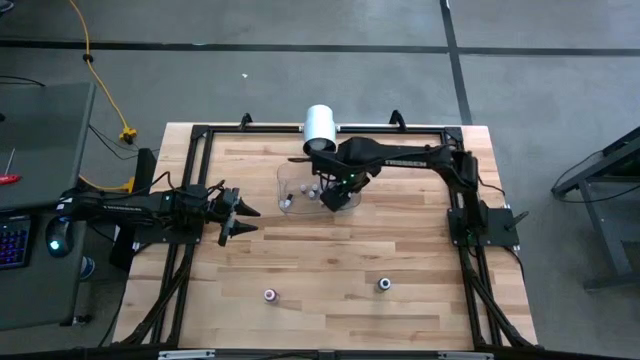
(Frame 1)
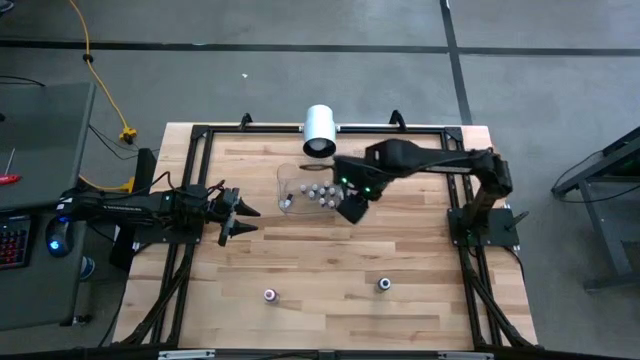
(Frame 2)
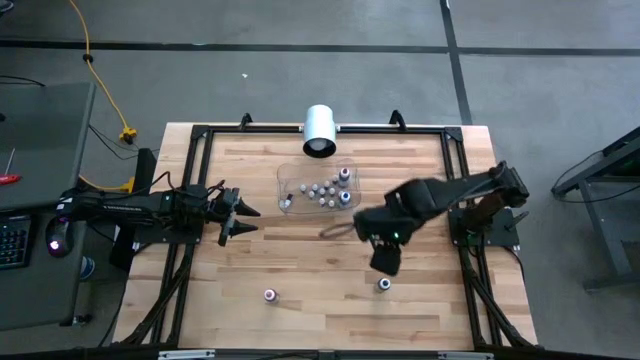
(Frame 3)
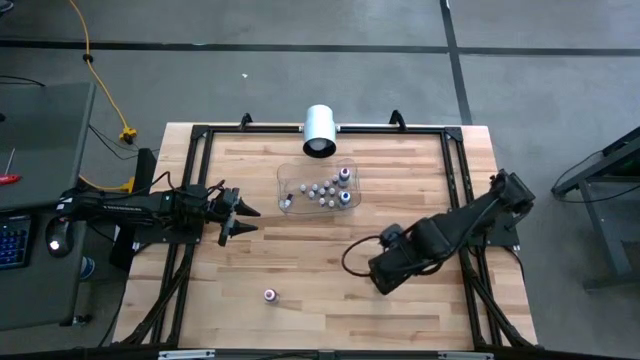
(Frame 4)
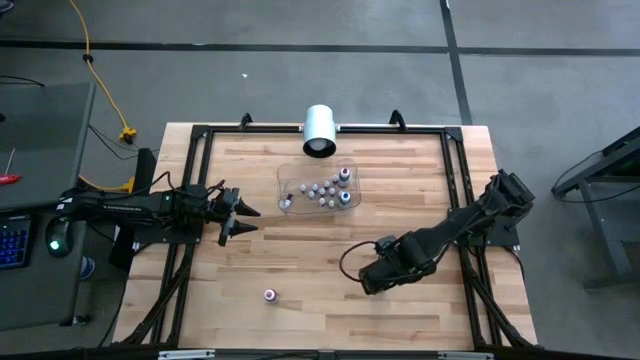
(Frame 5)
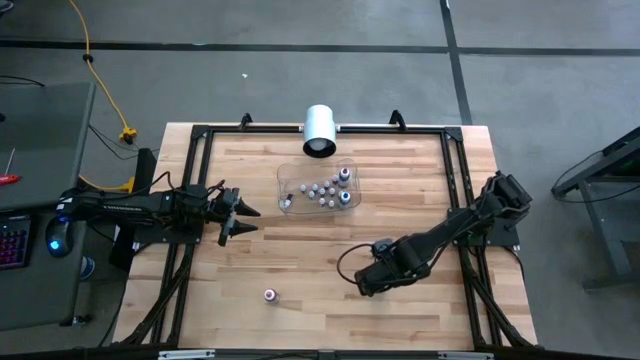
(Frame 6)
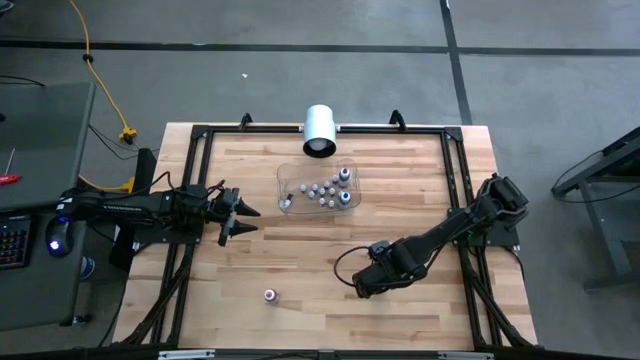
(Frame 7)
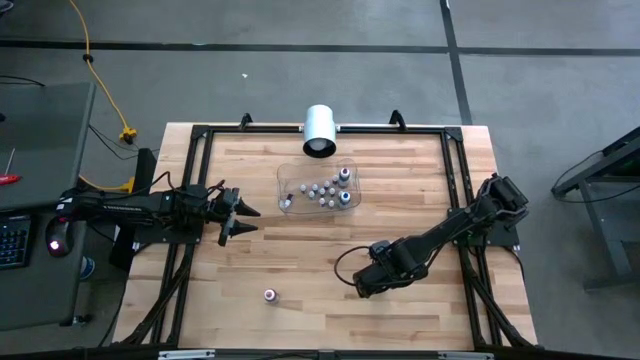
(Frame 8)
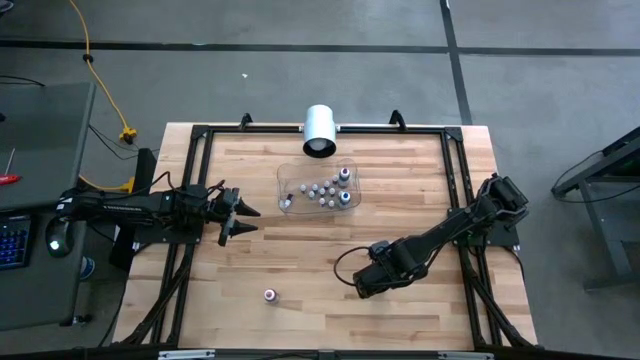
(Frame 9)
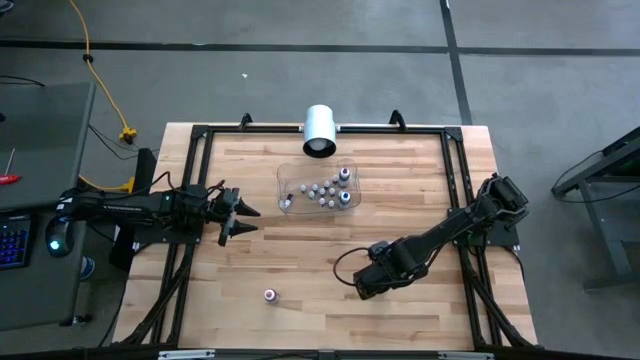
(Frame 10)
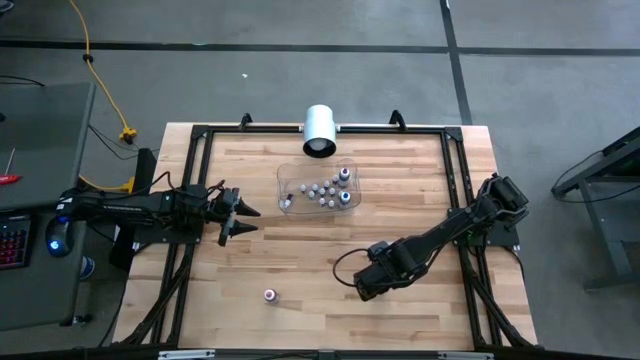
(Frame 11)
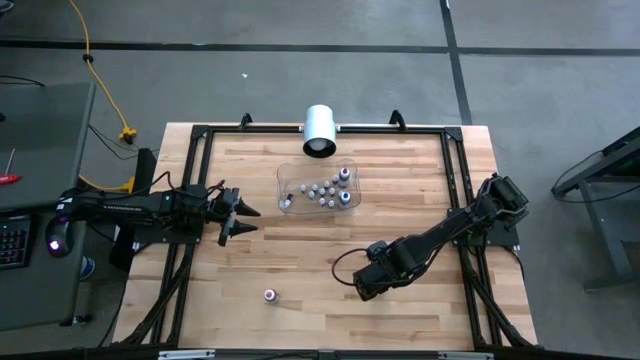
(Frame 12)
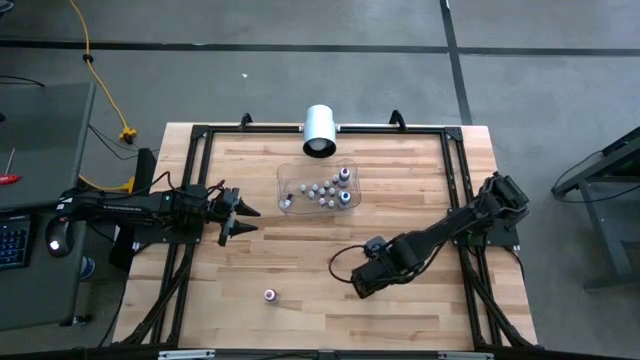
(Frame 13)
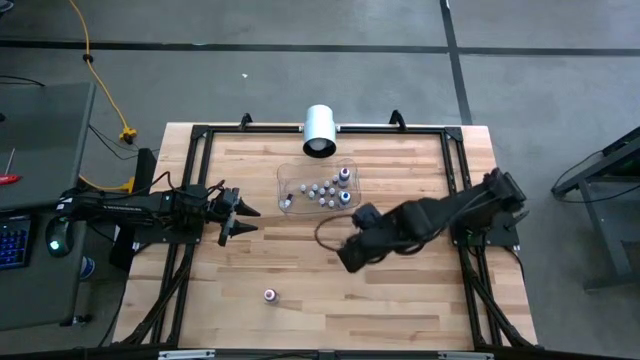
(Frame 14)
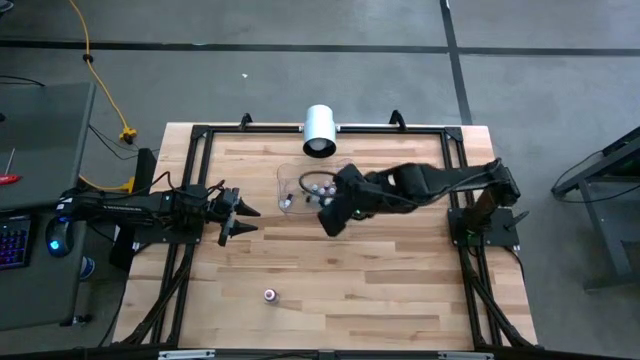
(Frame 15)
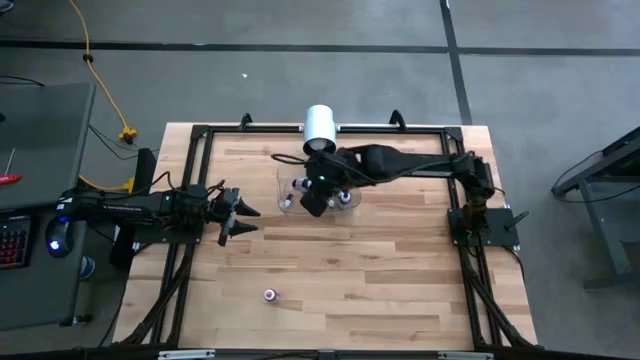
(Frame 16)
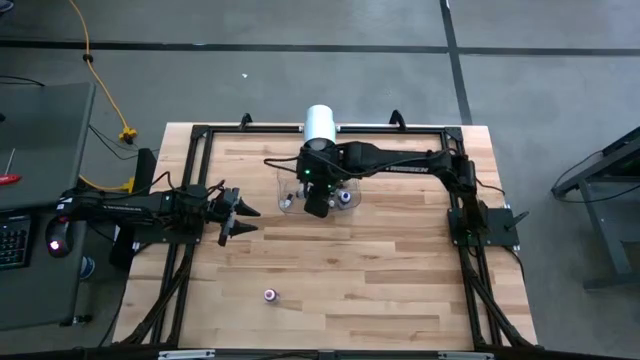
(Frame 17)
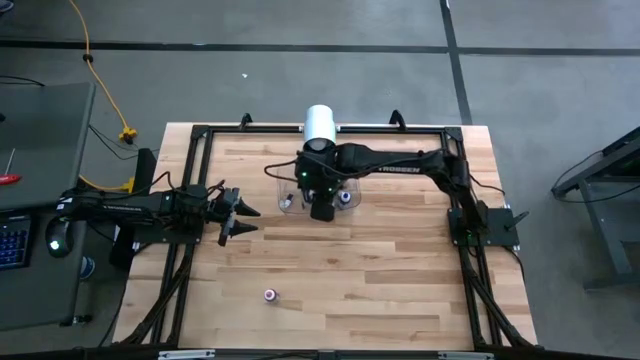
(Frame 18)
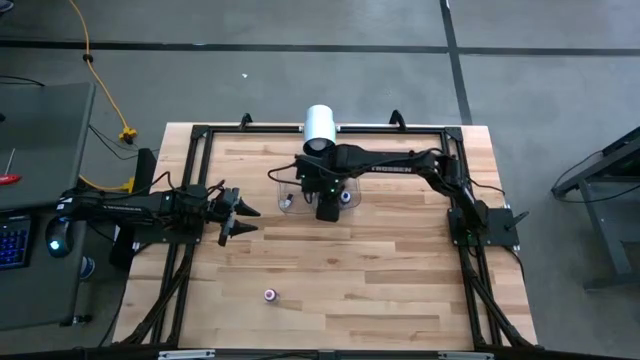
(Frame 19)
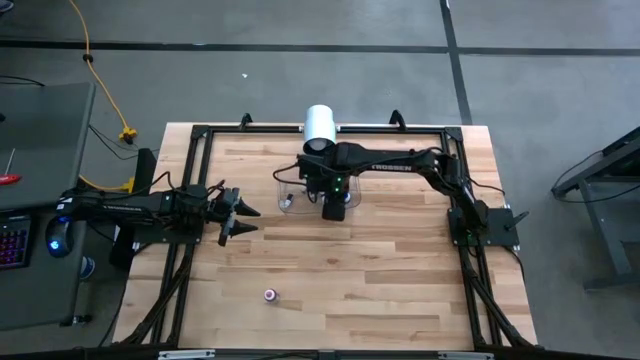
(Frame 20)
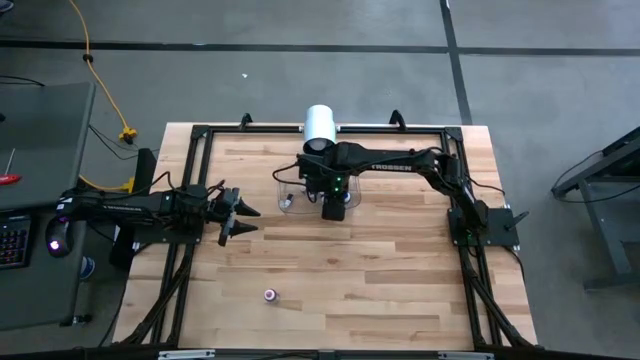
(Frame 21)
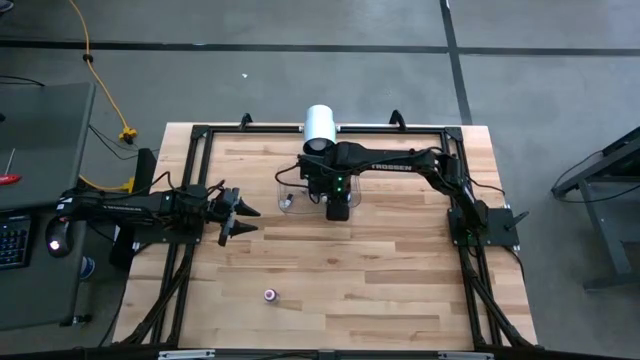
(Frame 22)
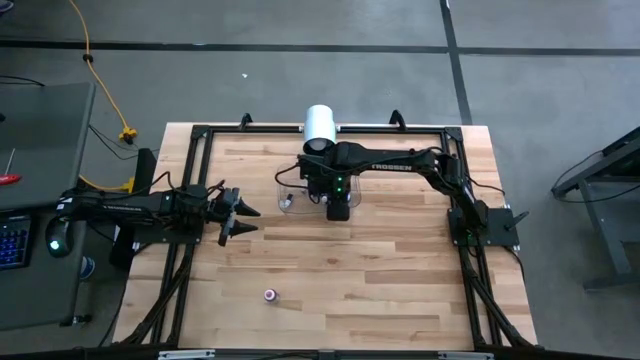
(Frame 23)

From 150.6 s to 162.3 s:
Task: Pick & Place food coloring
Put the large black food coloring bottle into the transparent bin

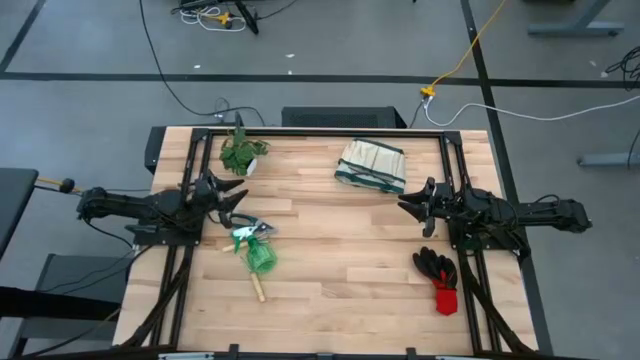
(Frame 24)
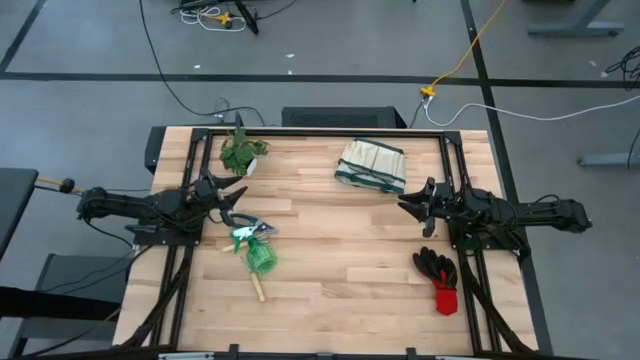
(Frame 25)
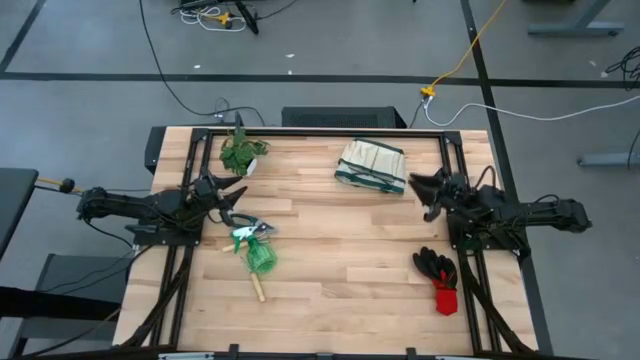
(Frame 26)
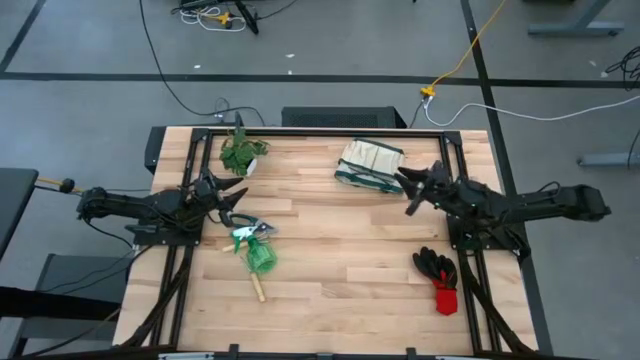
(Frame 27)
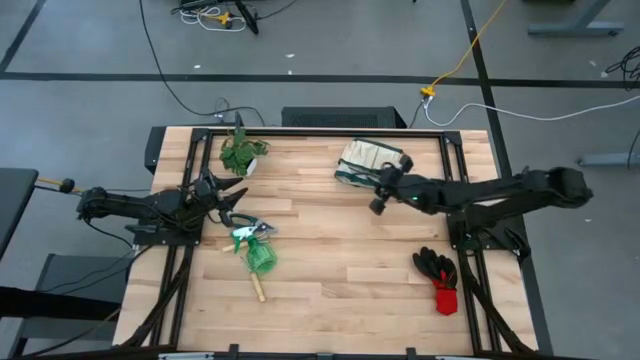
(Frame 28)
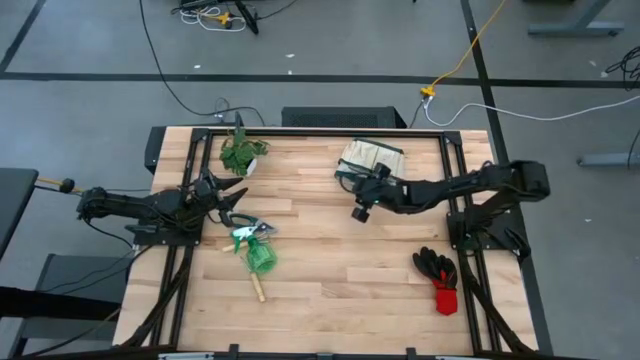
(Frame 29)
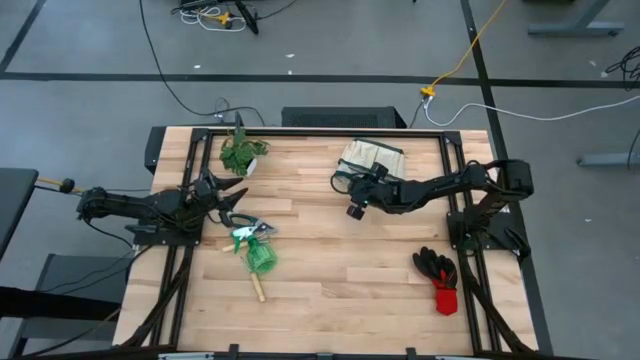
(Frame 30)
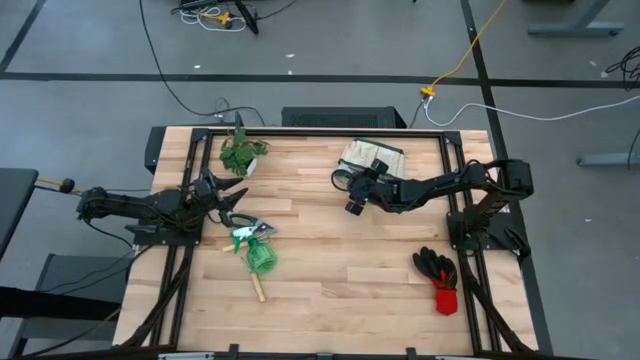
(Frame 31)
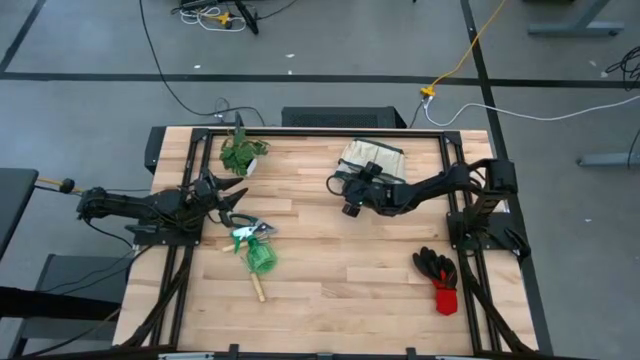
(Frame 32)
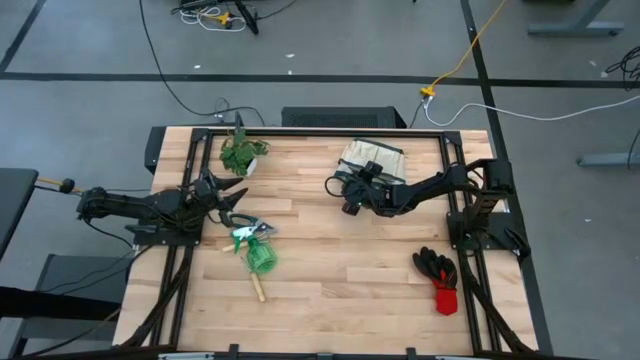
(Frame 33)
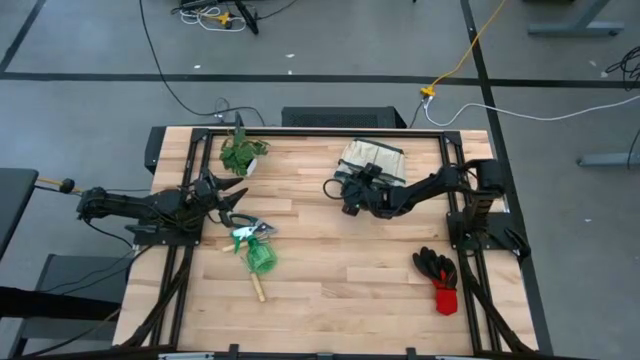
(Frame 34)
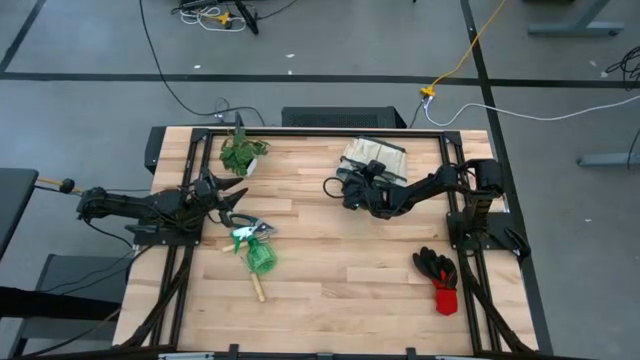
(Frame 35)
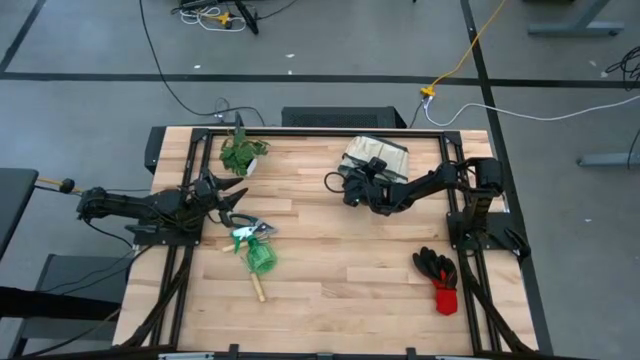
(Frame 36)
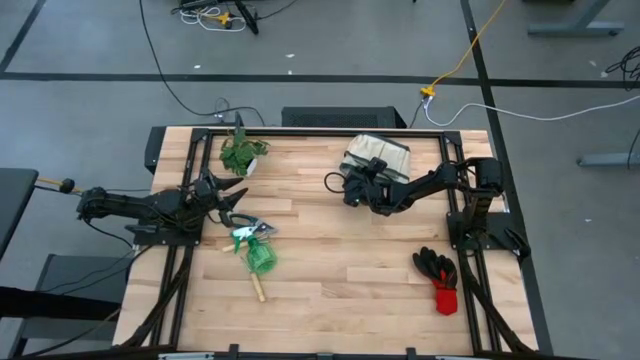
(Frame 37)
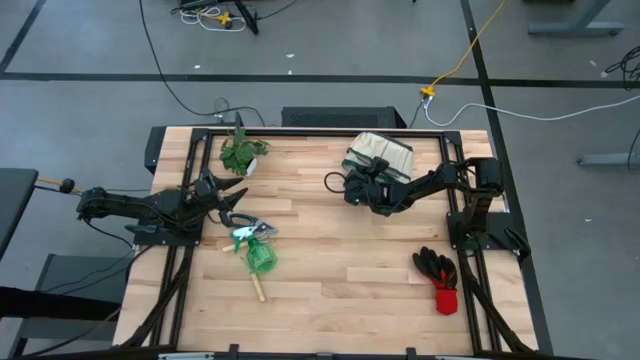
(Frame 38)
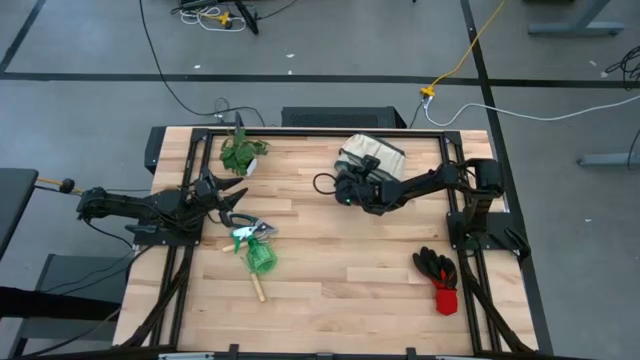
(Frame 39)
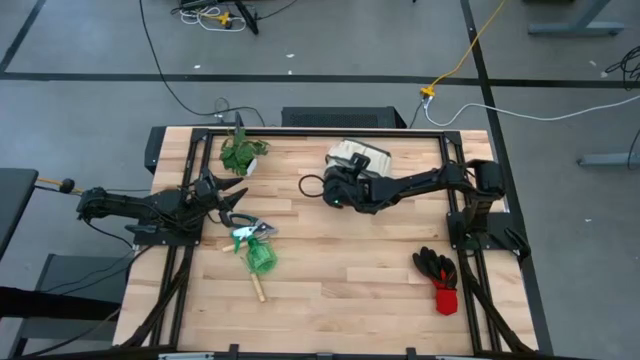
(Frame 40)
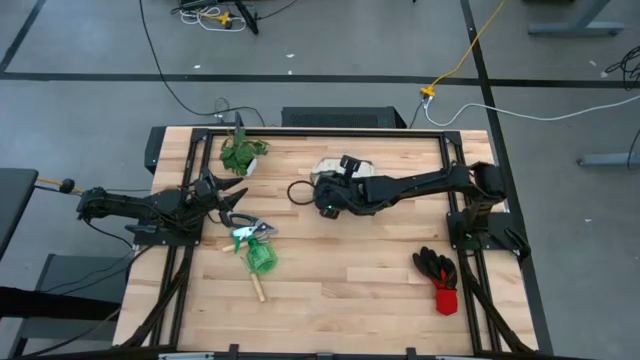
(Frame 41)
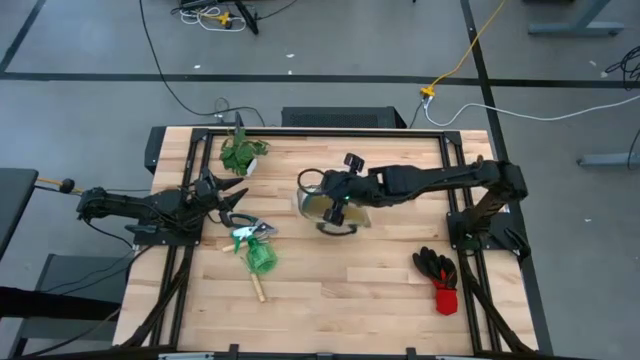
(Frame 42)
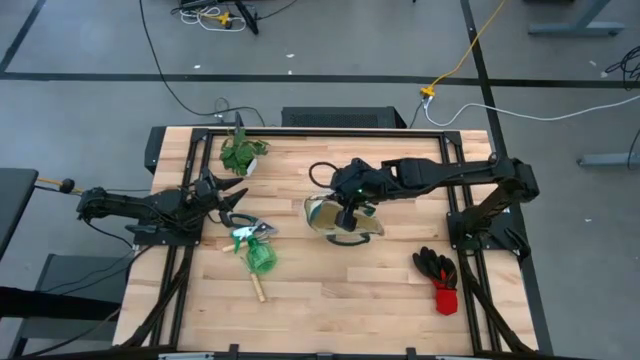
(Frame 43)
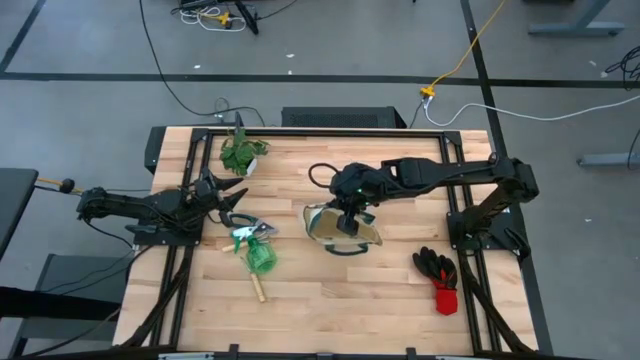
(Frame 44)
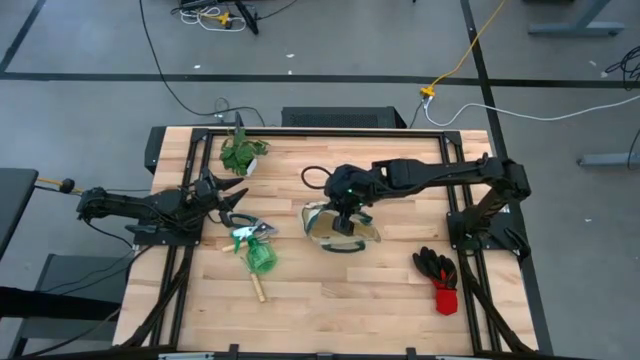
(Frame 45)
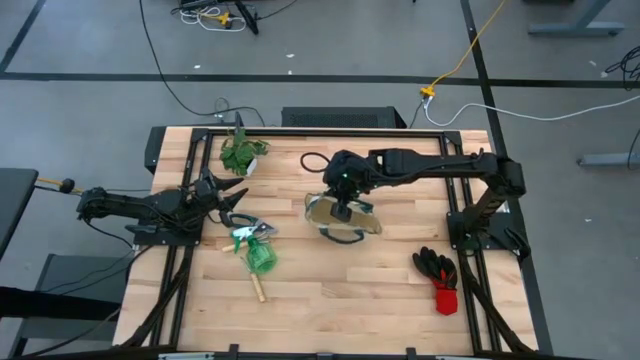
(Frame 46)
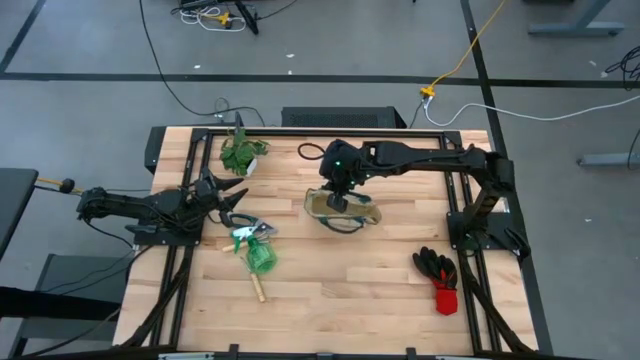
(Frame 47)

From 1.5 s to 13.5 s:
Task: Pick & Place Garden tools in Gardening bag
Prepare the white gardening bag
